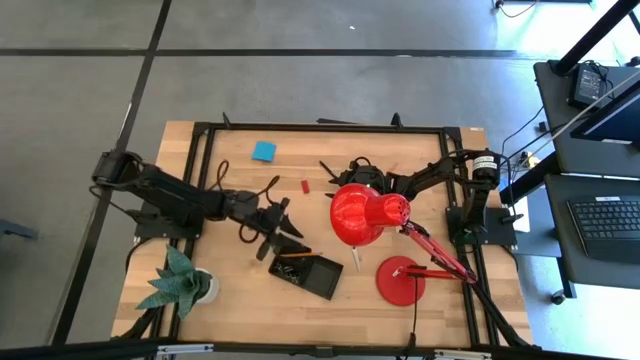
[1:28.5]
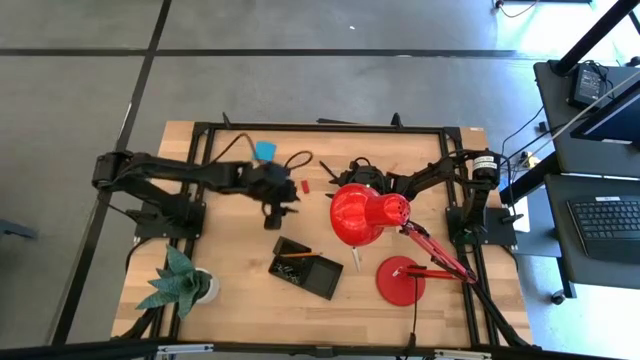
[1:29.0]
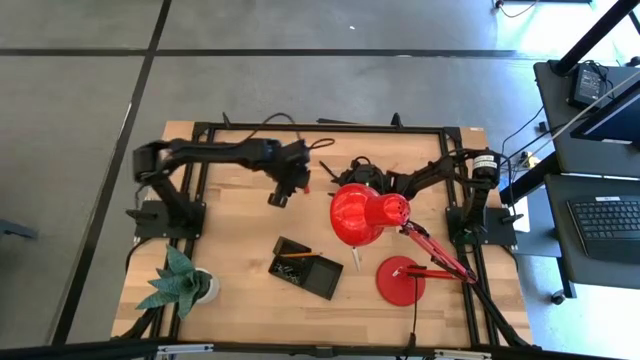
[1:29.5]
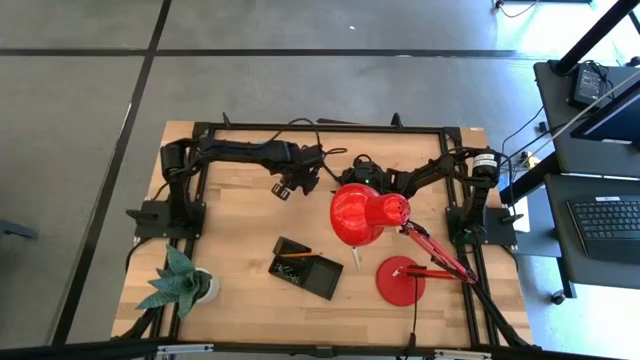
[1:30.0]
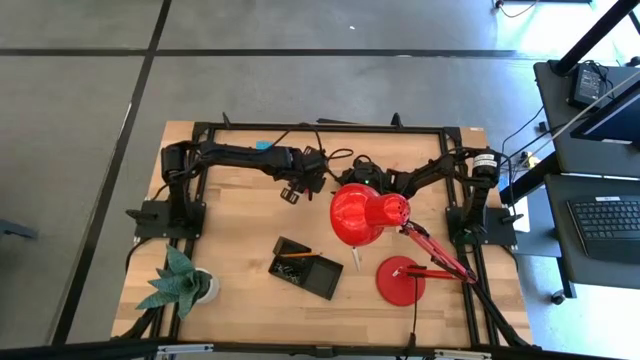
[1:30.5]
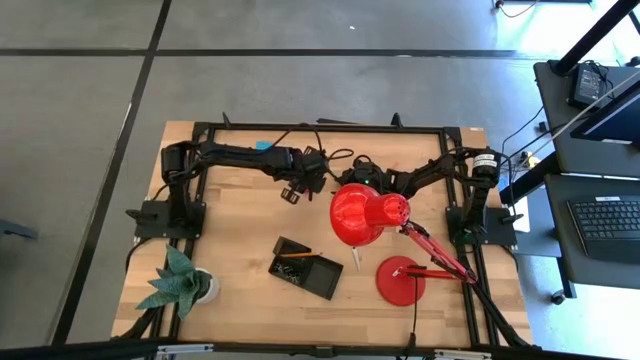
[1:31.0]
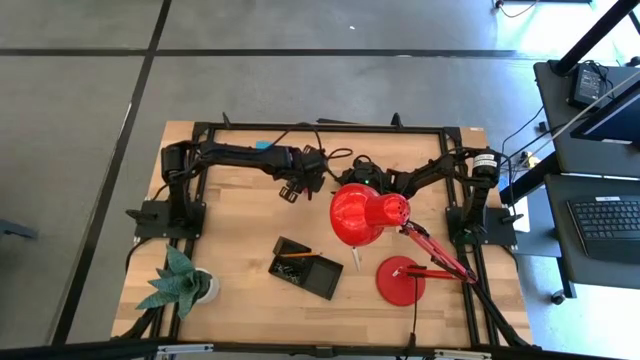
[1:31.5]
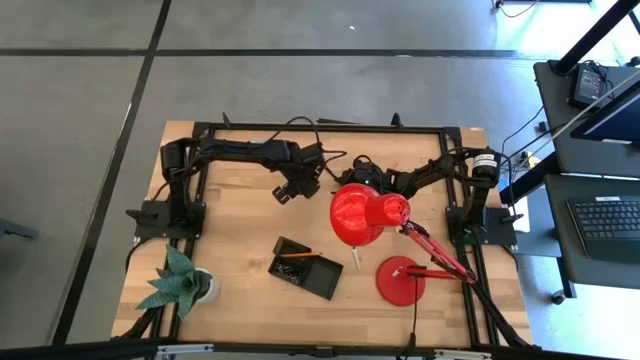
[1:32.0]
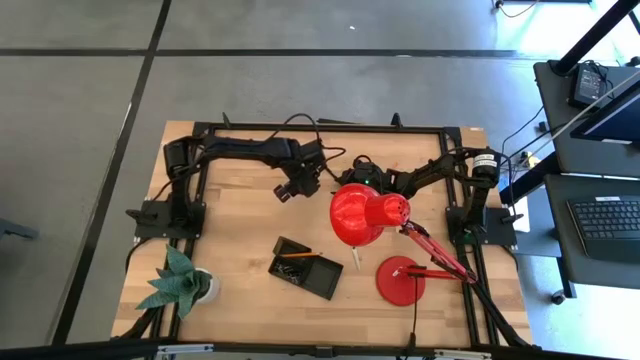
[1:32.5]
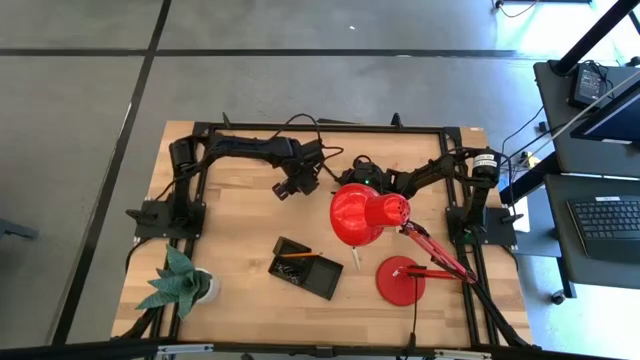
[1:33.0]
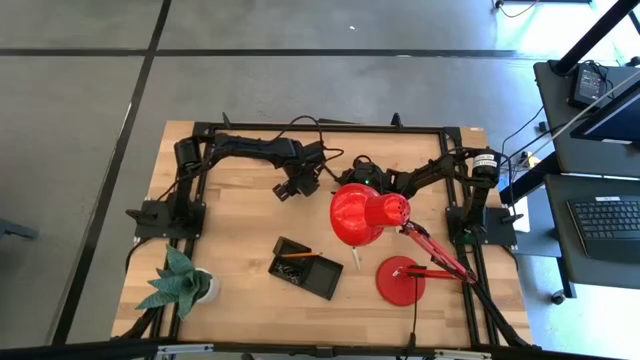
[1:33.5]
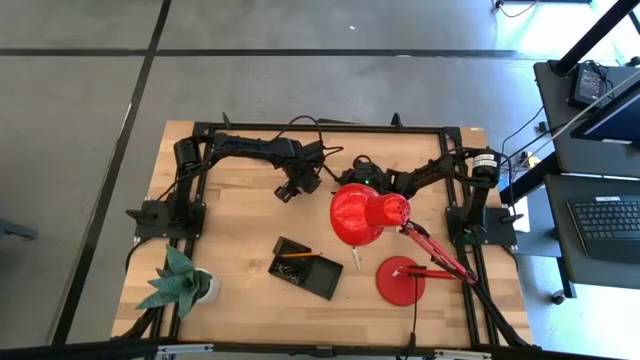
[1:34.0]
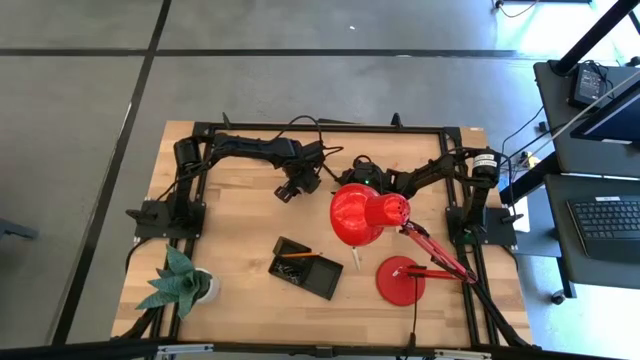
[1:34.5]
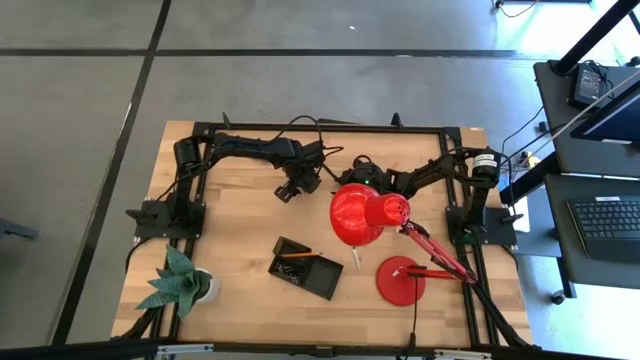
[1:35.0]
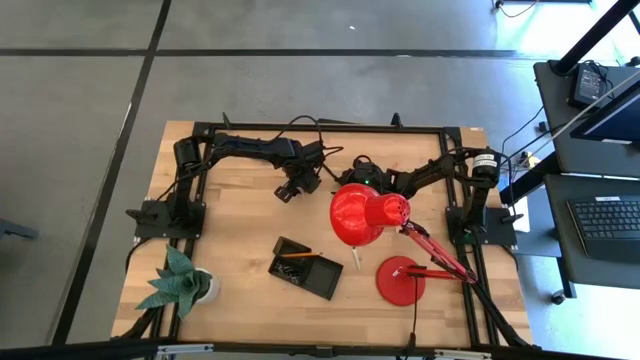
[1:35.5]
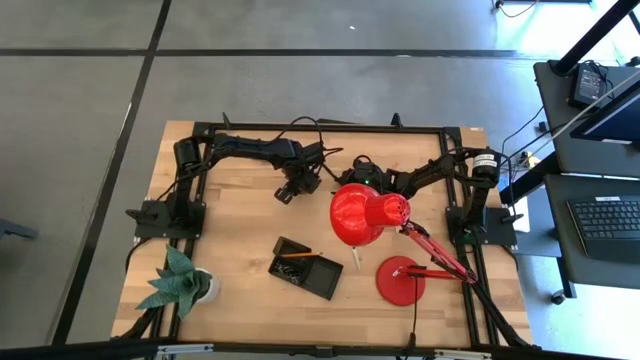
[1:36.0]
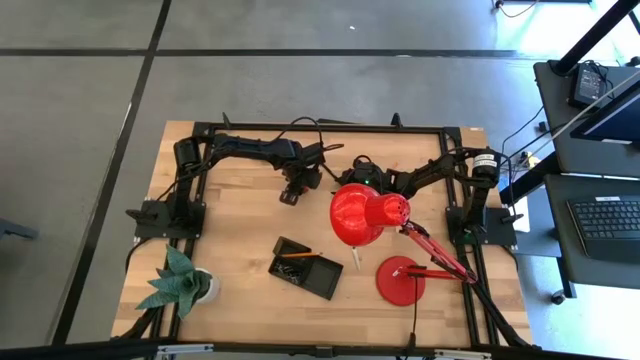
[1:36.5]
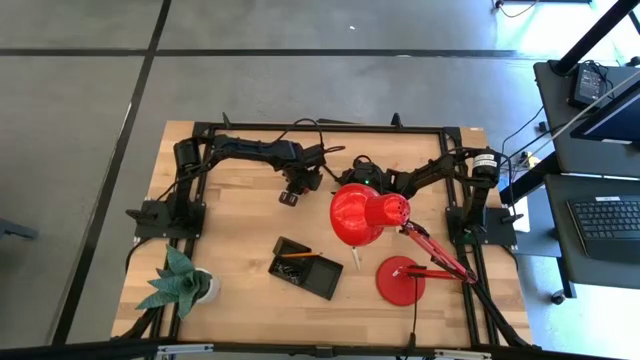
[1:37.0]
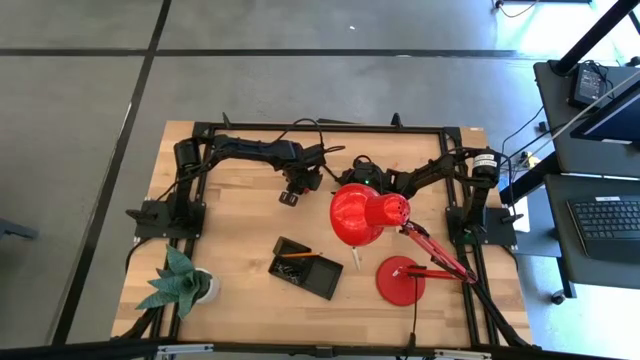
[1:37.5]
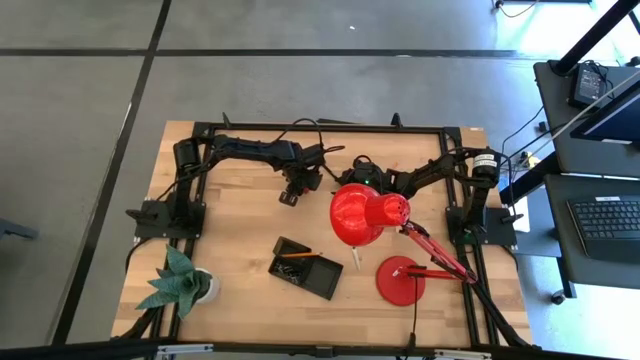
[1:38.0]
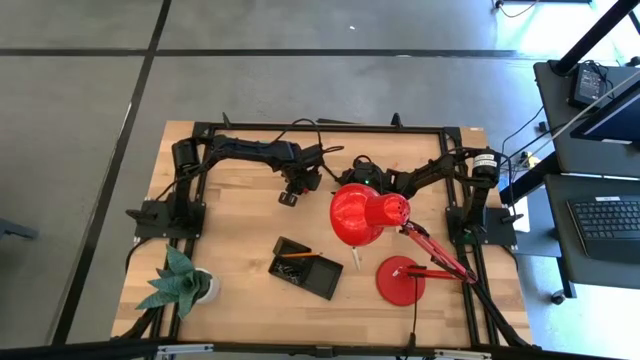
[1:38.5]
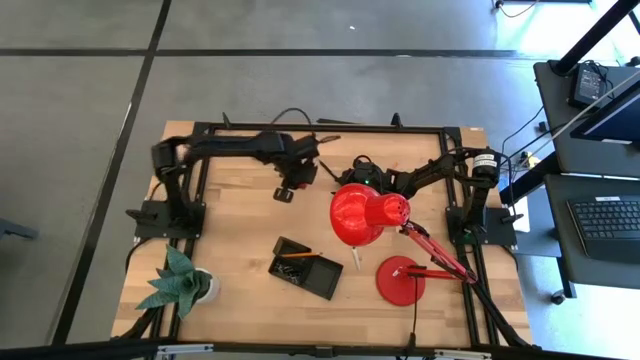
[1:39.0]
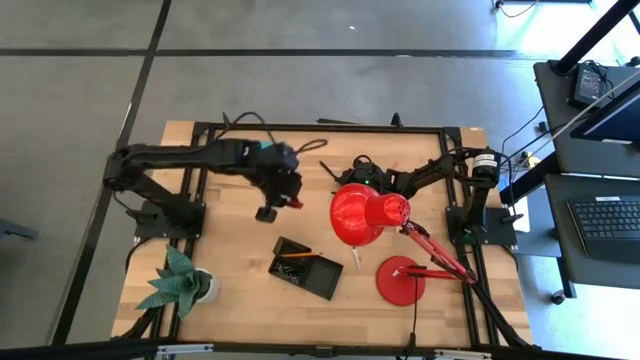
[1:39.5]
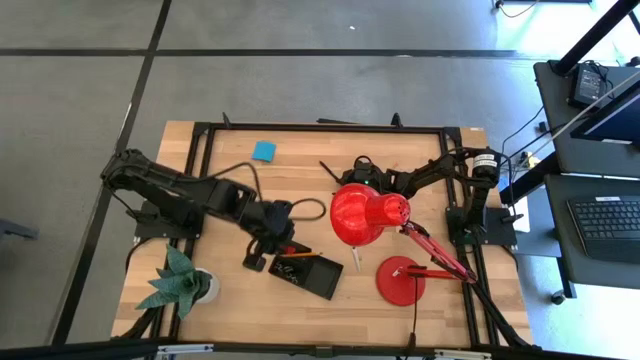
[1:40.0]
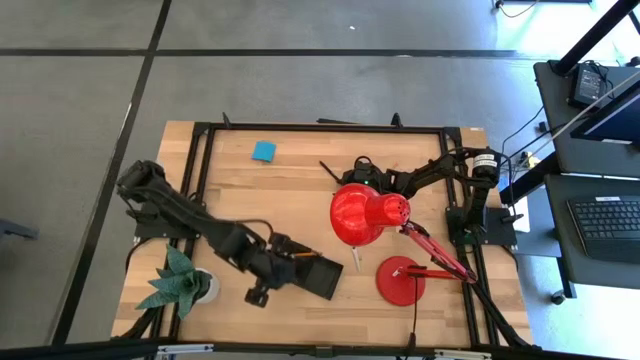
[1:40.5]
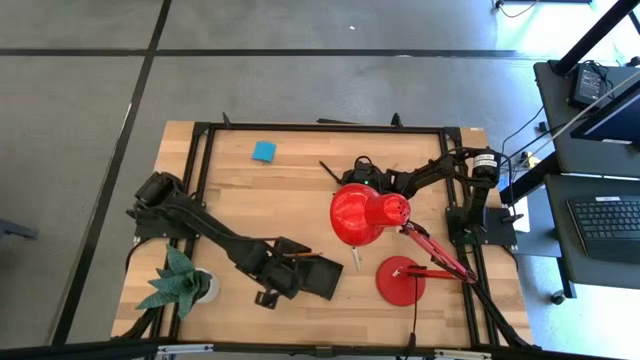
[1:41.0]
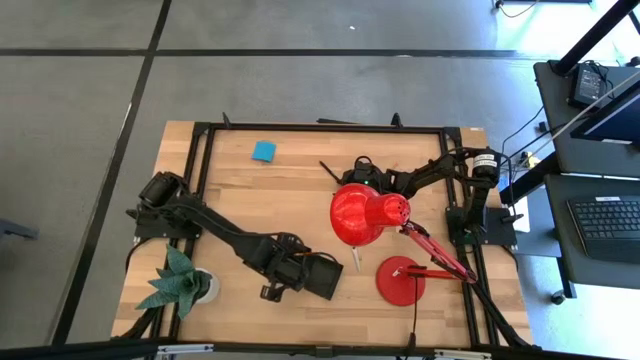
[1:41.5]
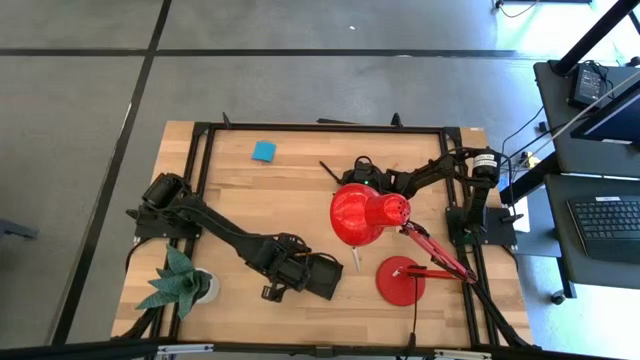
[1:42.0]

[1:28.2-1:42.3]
Task: Pick and place office supplies into organizer
Put the red eraser into the desk organizer

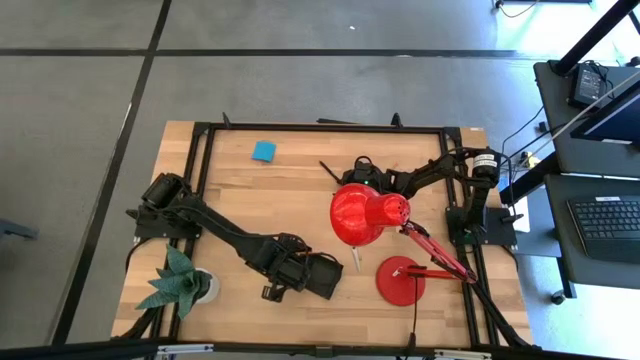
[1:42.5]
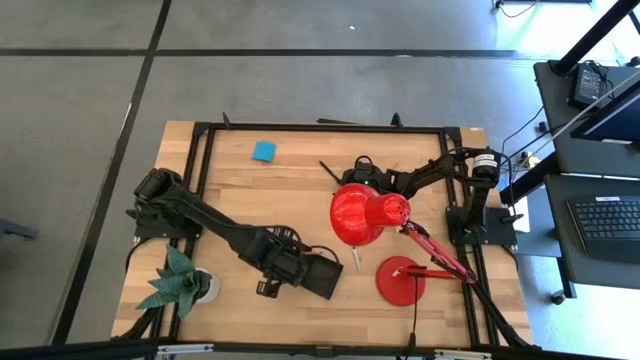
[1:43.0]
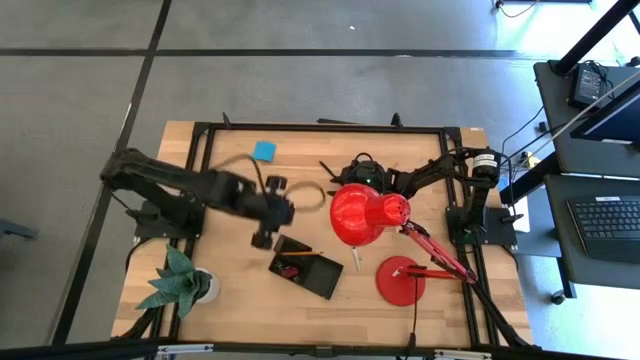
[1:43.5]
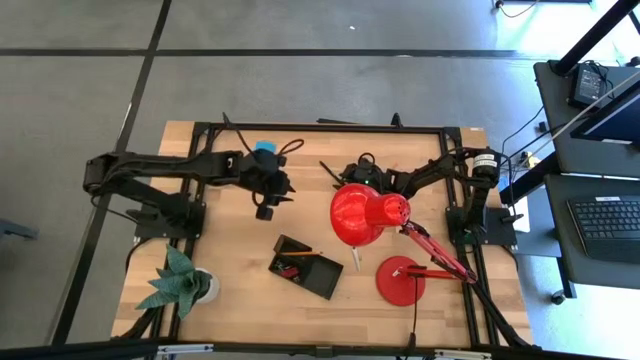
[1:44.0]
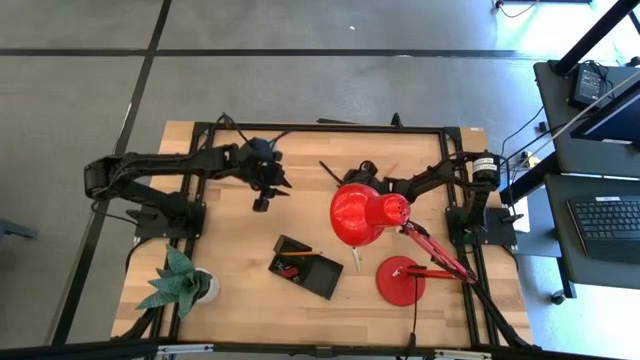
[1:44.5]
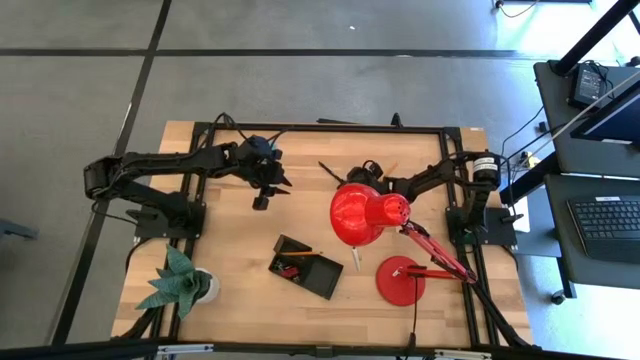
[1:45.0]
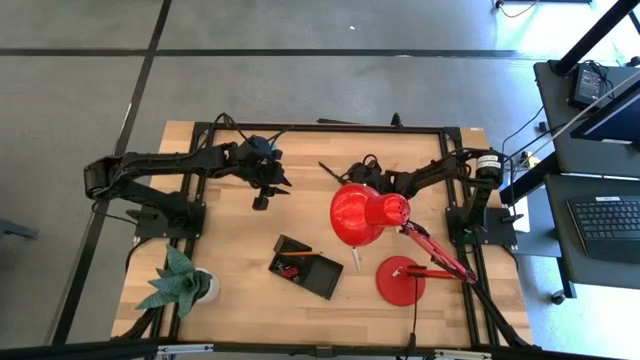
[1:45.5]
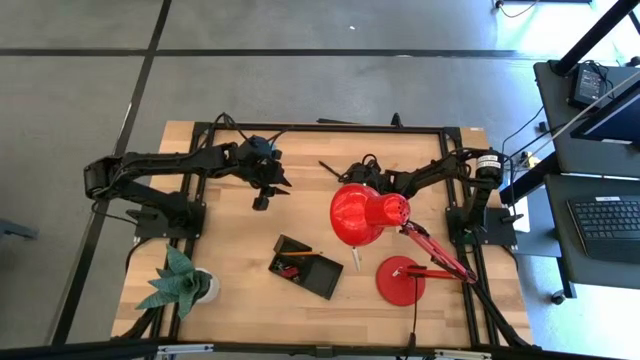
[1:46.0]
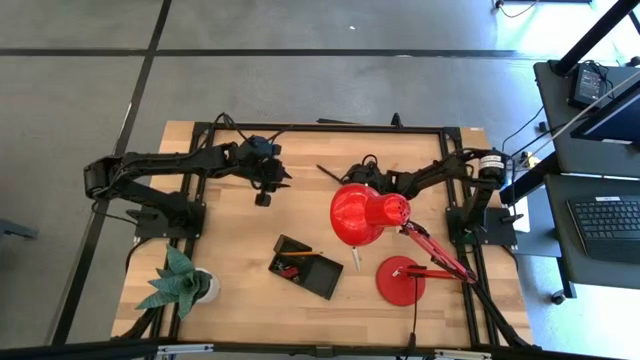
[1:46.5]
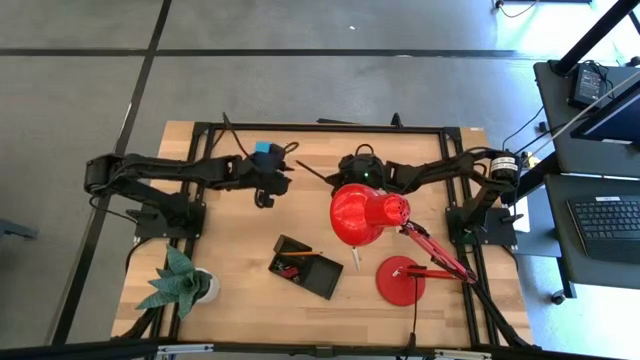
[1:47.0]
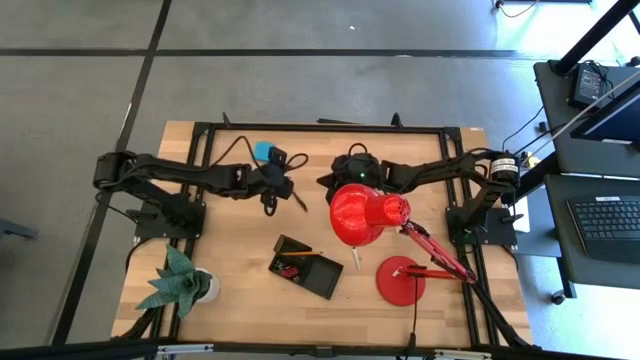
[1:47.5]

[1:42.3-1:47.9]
Put the black ballpen into the desk organizer

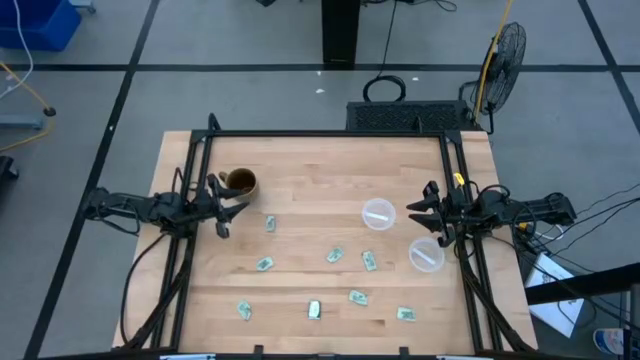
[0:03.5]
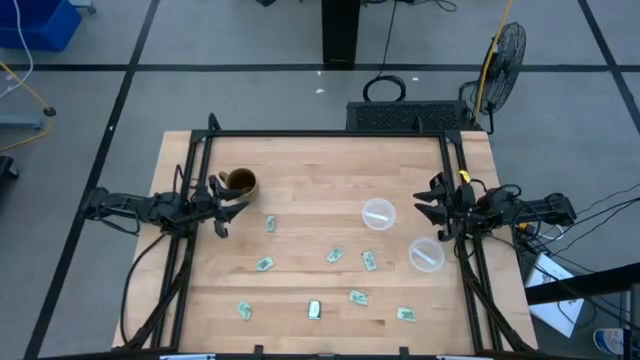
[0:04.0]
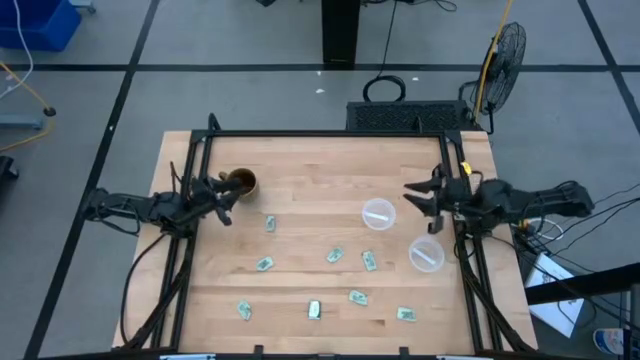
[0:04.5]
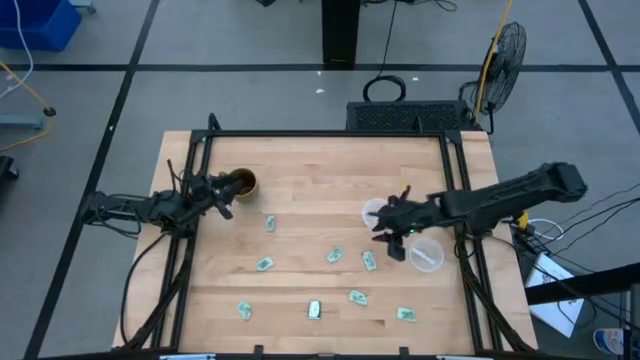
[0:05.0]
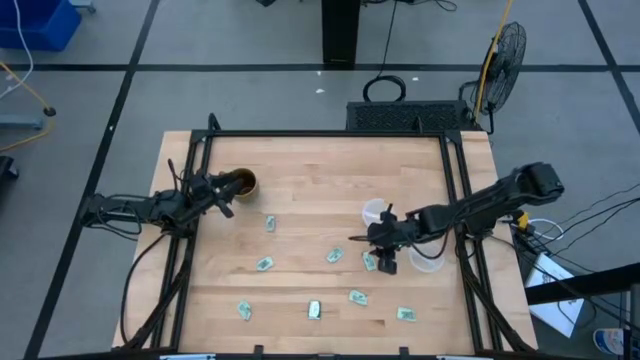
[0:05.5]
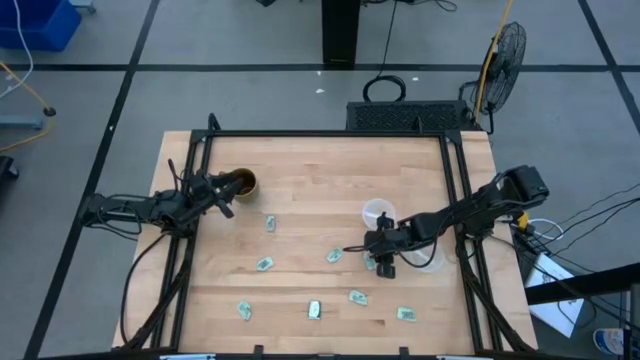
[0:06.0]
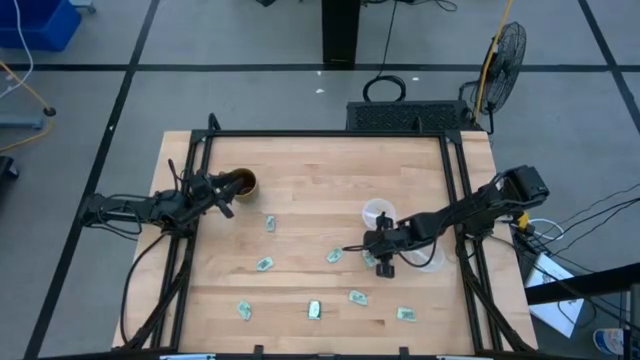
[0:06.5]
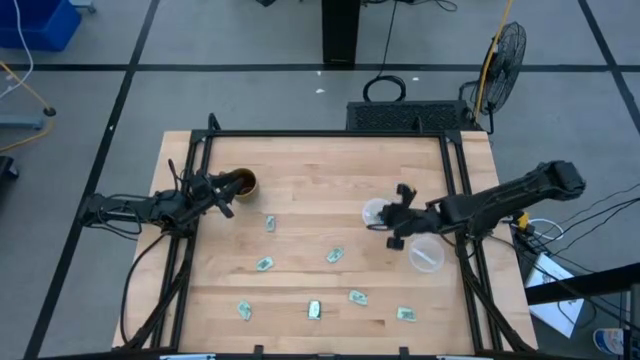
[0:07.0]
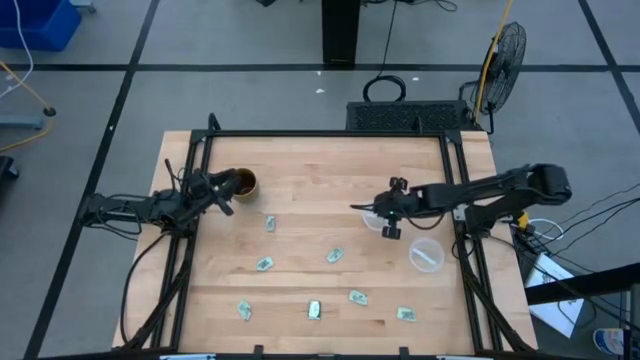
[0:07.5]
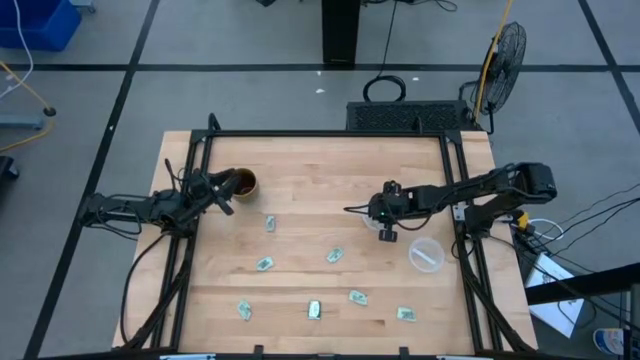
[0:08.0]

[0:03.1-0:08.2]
Task: Pick and place items into bin
Put the white stevia packet into the top transparent bin
